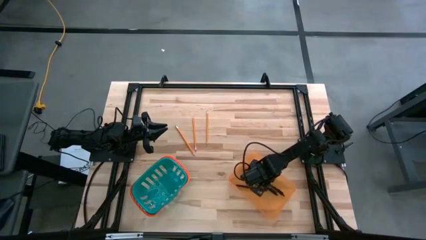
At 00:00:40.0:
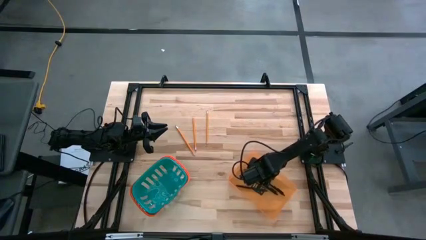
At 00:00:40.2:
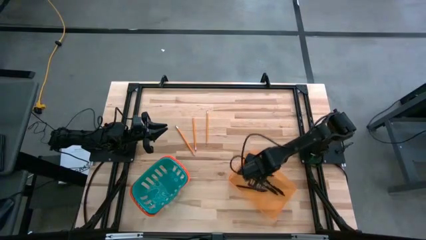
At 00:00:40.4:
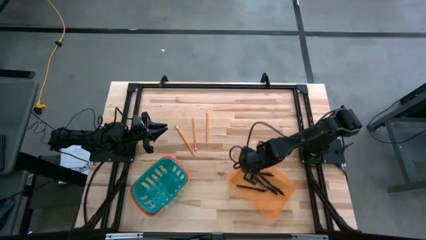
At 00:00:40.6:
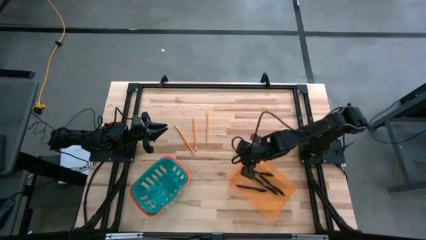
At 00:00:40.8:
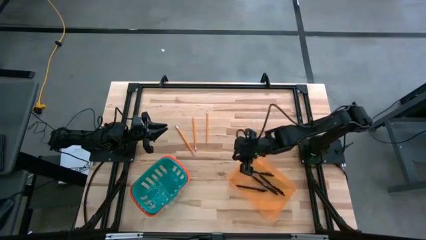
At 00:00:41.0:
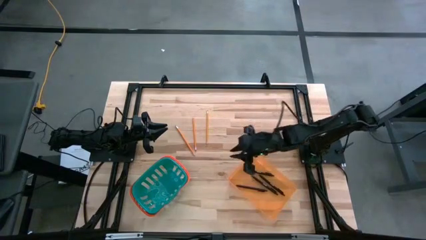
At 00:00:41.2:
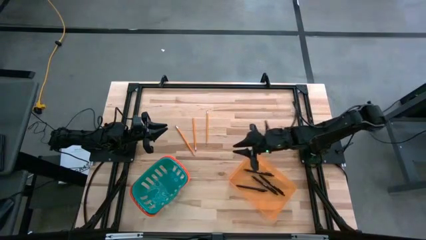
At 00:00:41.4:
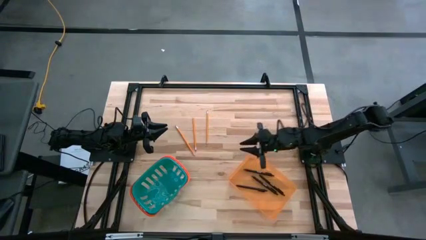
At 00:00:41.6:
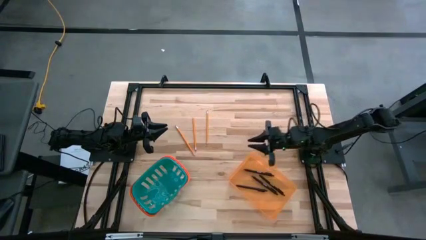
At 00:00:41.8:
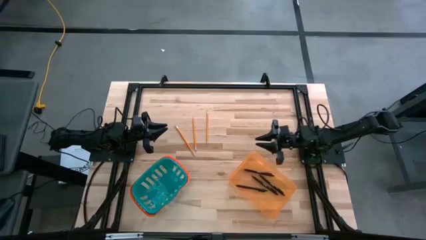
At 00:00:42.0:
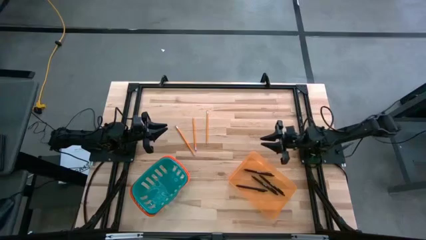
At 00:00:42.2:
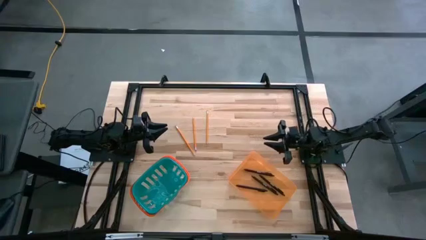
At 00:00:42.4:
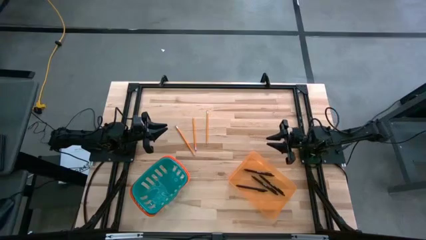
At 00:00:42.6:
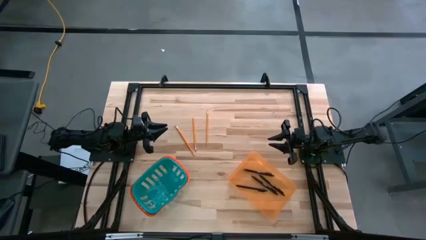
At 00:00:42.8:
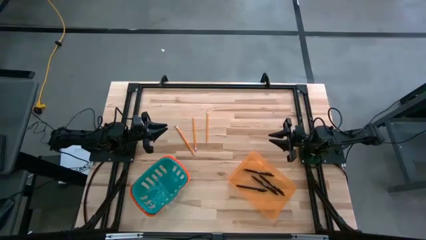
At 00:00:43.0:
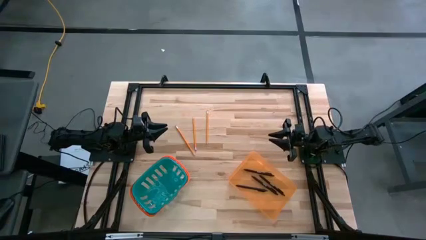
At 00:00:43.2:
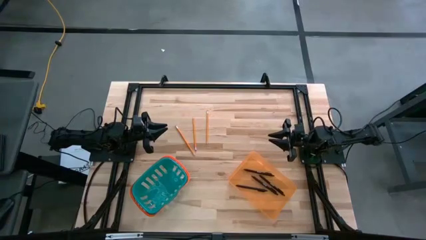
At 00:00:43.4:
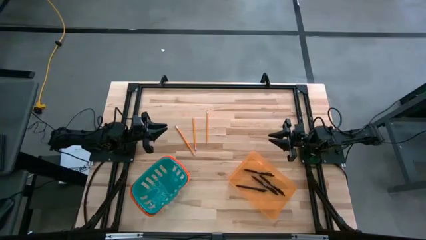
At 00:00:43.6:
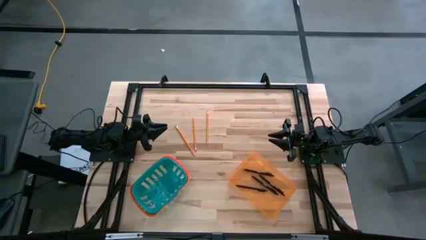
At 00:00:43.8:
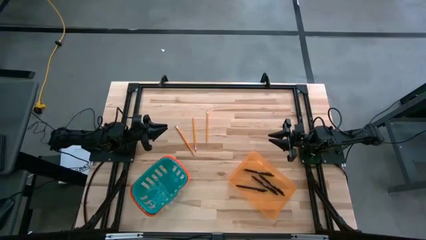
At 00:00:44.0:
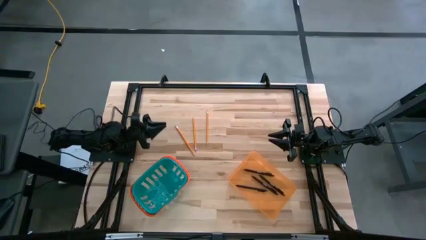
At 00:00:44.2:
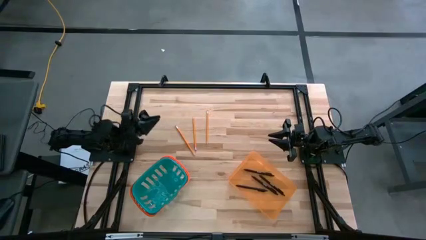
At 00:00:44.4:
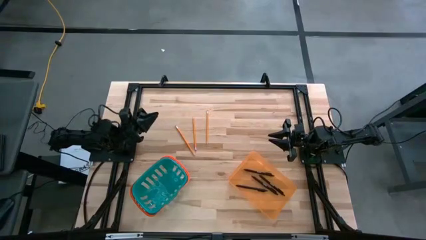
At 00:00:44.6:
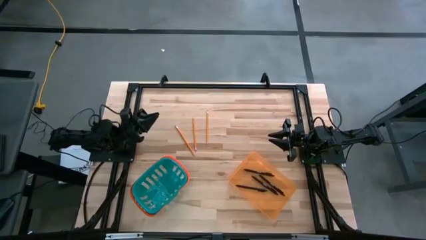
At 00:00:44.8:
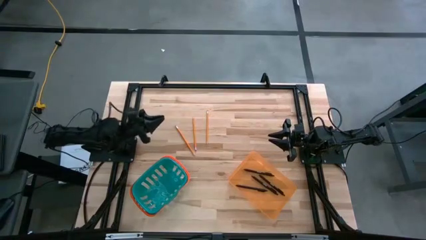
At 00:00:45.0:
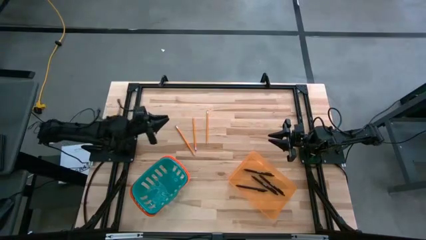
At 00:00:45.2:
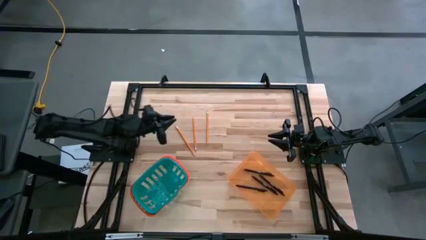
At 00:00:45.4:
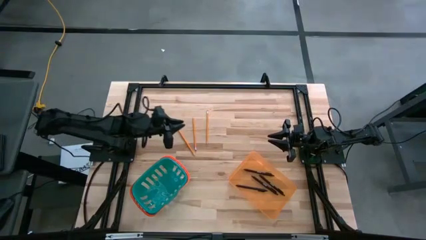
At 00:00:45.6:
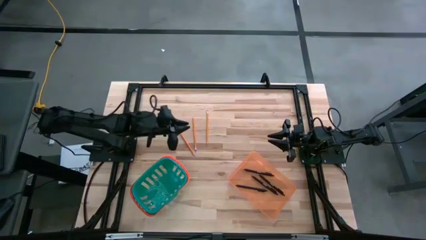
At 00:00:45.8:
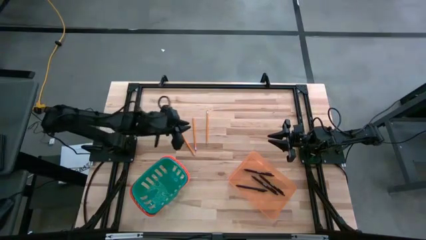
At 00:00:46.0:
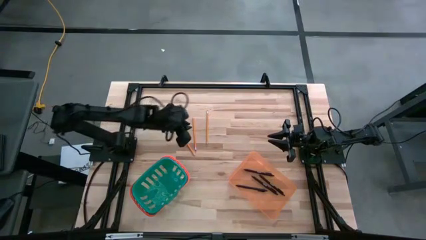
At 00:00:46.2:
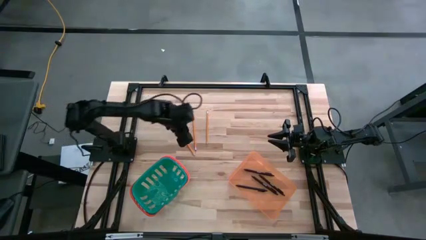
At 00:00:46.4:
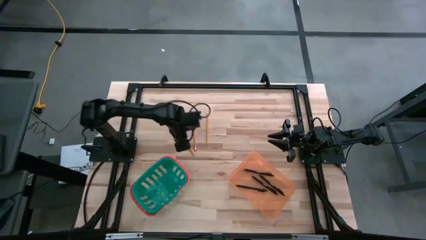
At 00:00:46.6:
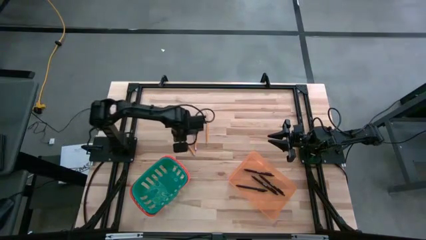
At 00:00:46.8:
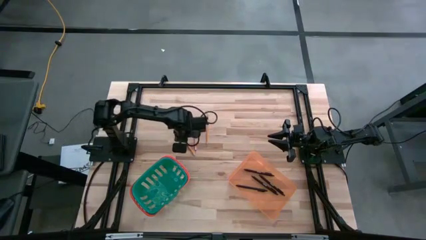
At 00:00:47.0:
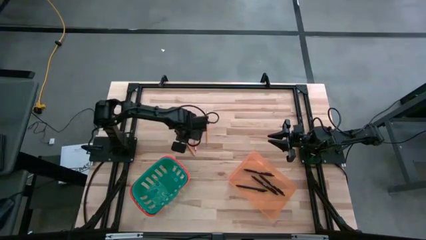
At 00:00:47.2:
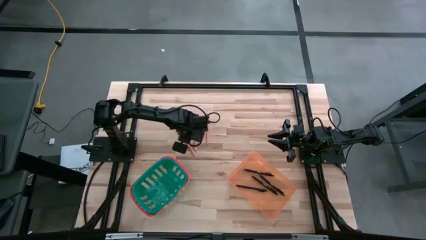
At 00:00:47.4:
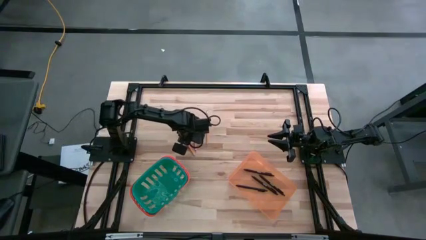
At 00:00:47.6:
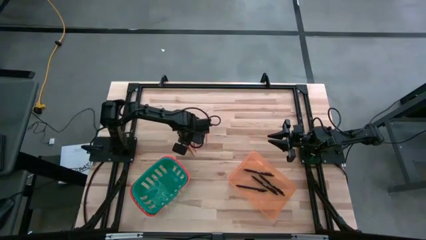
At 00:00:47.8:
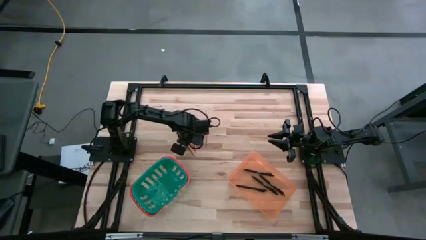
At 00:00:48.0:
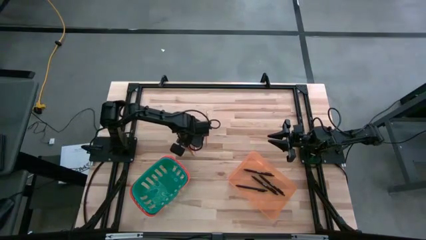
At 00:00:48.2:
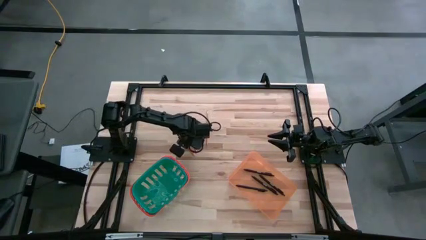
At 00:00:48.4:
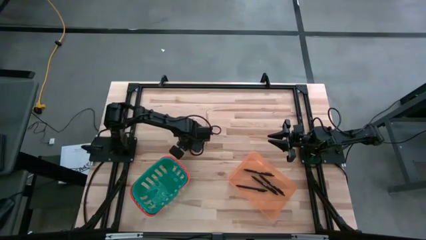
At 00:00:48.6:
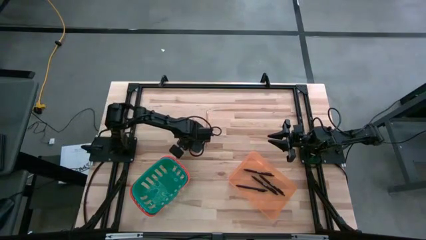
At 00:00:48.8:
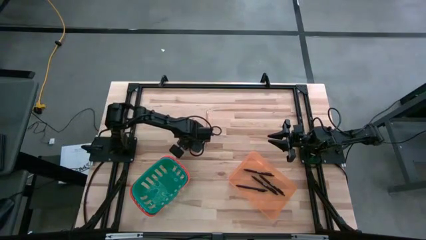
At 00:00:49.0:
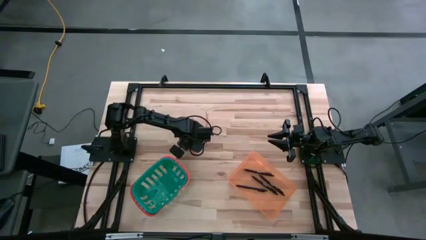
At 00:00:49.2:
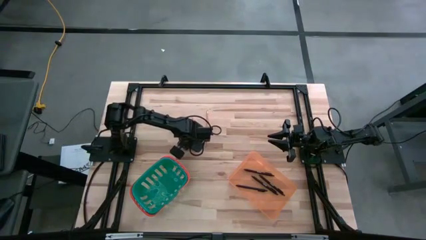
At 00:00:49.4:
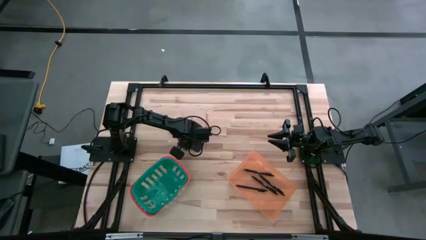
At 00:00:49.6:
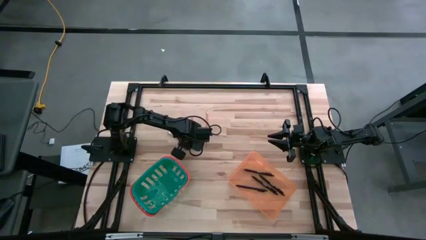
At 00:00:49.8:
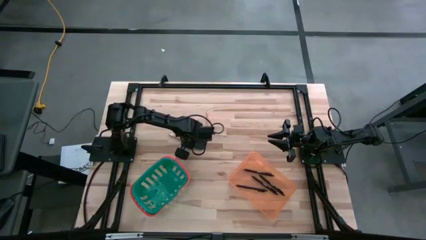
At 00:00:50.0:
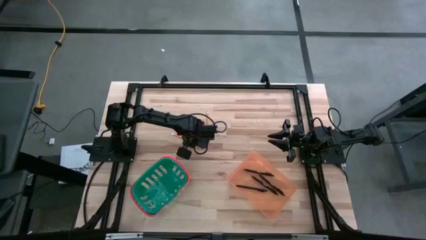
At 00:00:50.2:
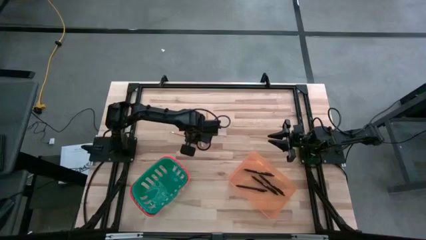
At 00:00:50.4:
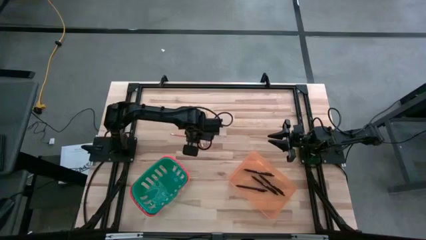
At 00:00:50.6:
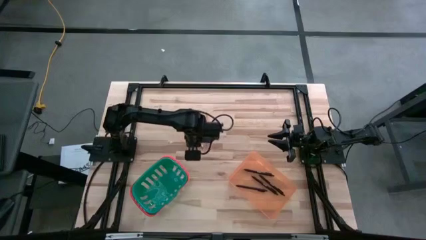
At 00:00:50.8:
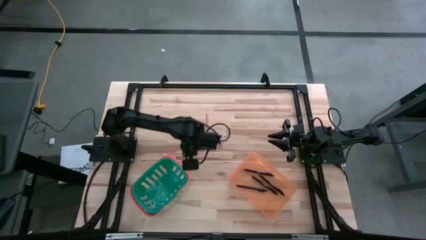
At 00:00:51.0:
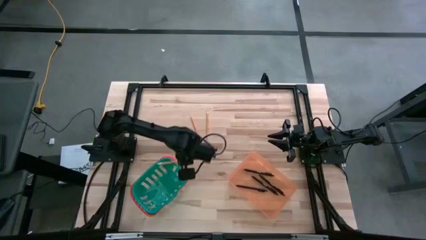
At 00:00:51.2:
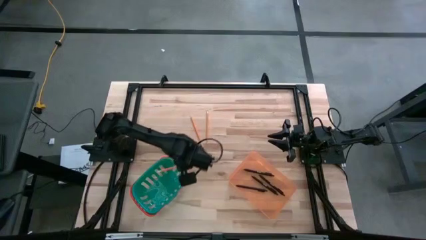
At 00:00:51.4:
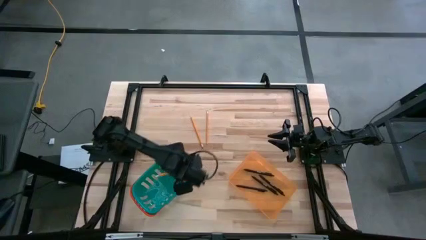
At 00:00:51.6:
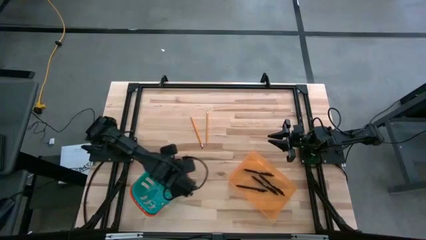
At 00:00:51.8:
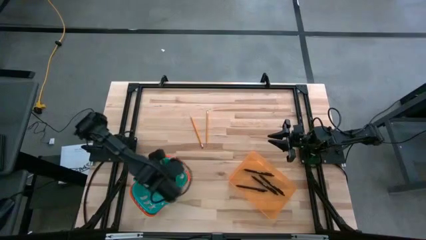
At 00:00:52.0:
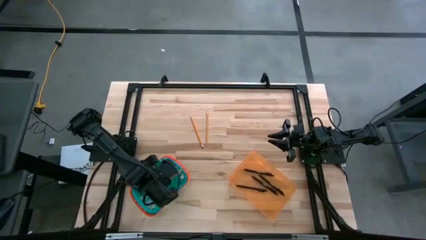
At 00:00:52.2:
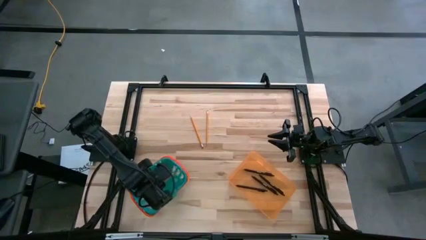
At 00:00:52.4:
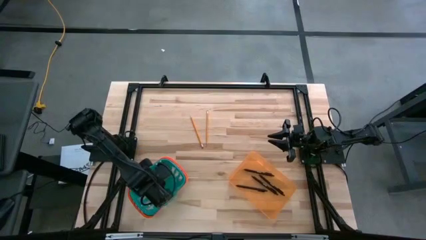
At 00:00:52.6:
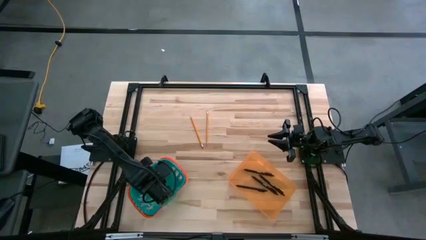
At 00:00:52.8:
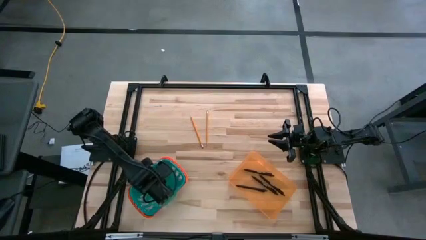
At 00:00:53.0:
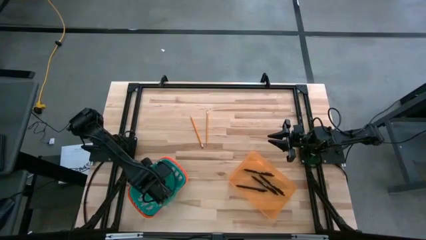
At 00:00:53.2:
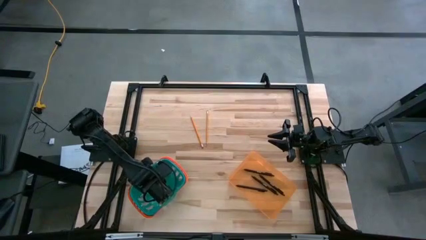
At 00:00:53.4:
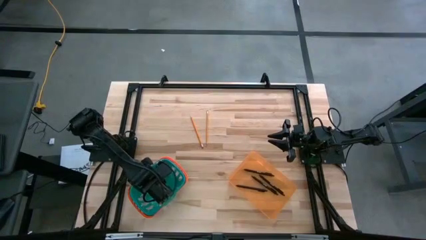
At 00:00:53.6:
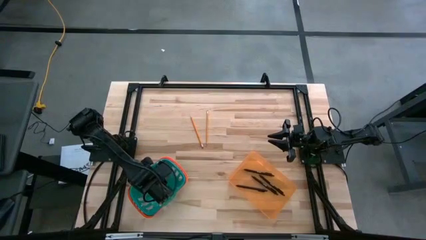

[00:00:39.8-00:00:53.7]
Task: Sort pens & pencils
Put the left yellow pencil into the blue bin
